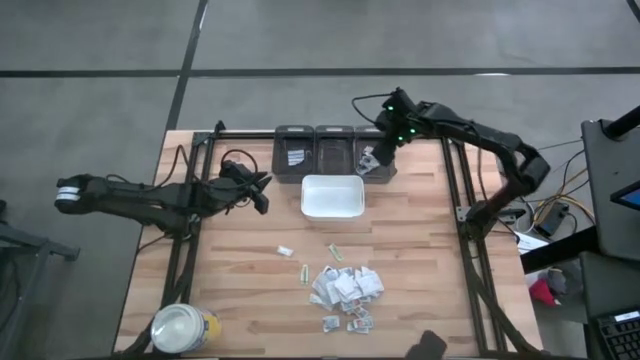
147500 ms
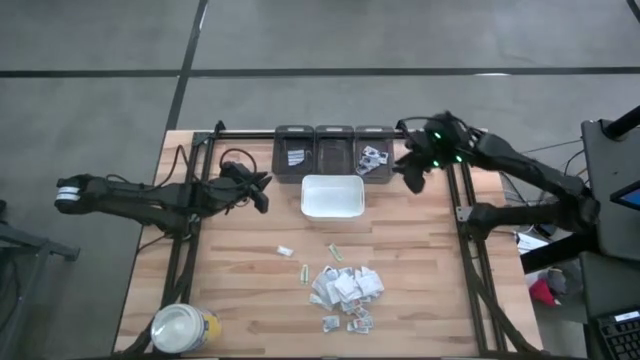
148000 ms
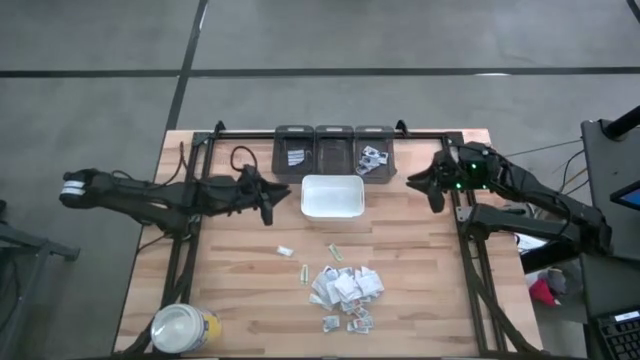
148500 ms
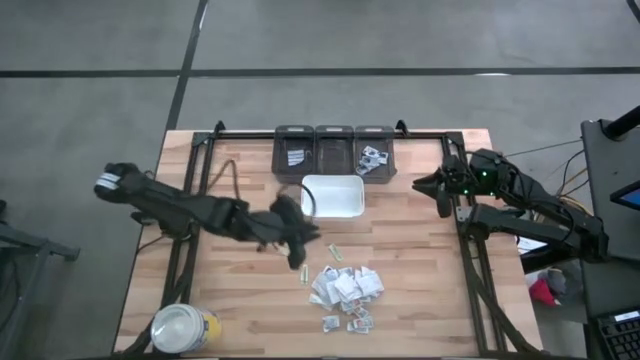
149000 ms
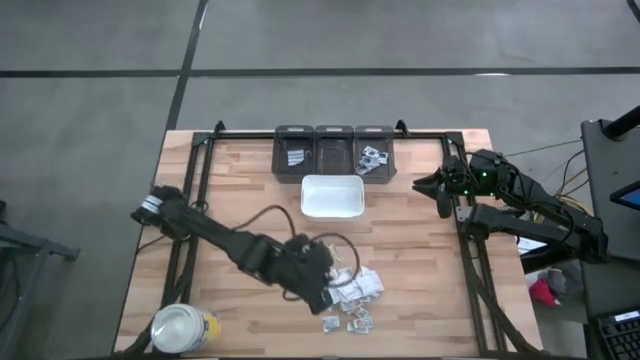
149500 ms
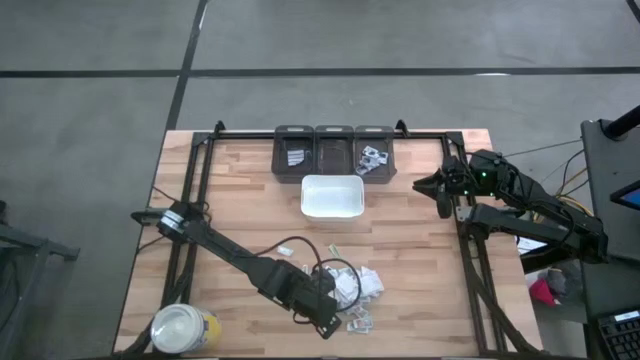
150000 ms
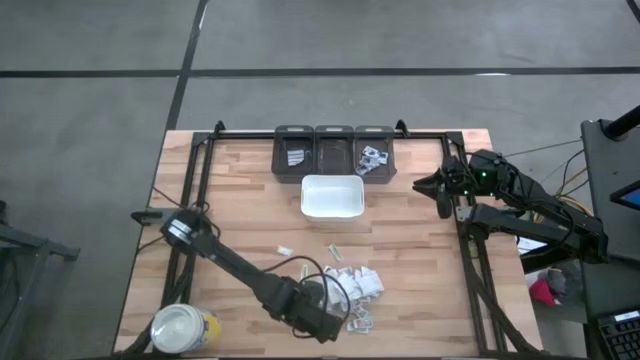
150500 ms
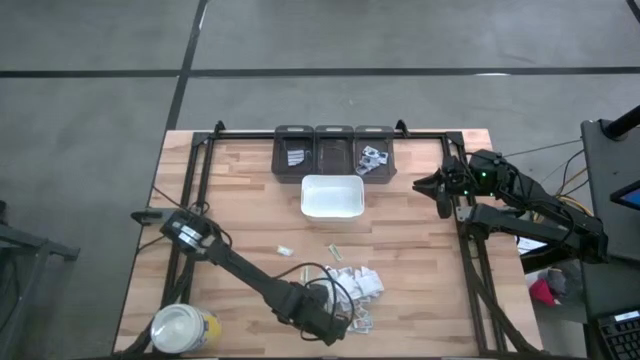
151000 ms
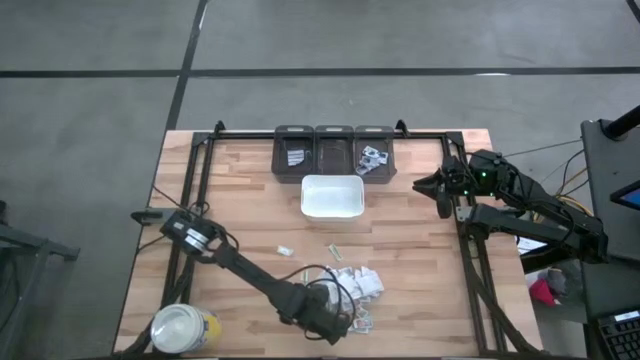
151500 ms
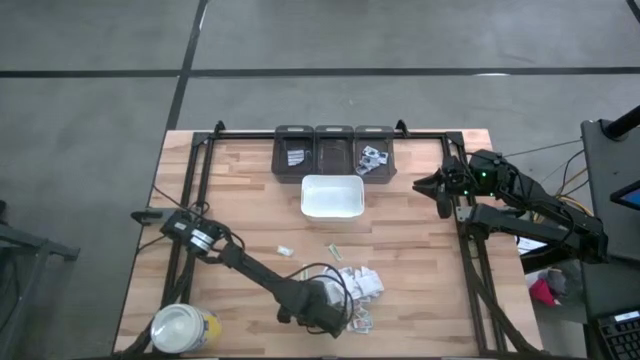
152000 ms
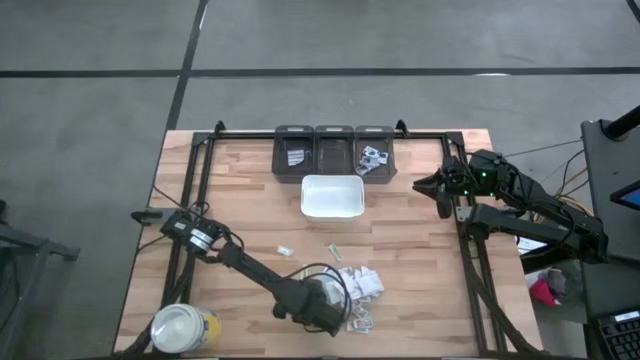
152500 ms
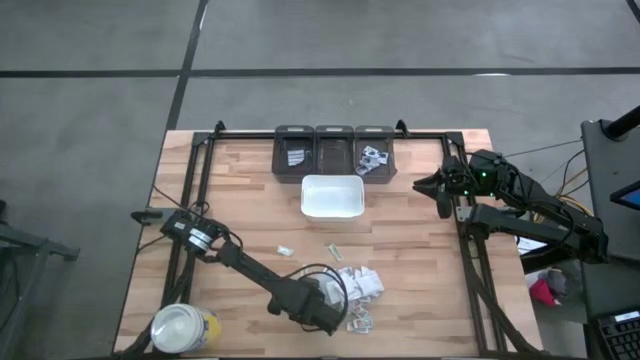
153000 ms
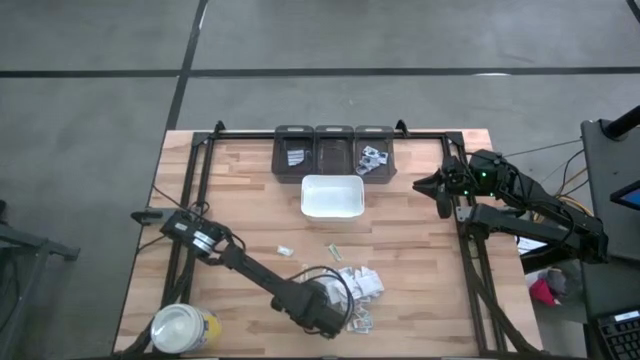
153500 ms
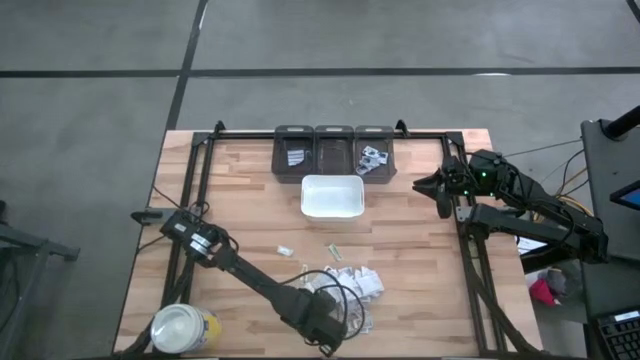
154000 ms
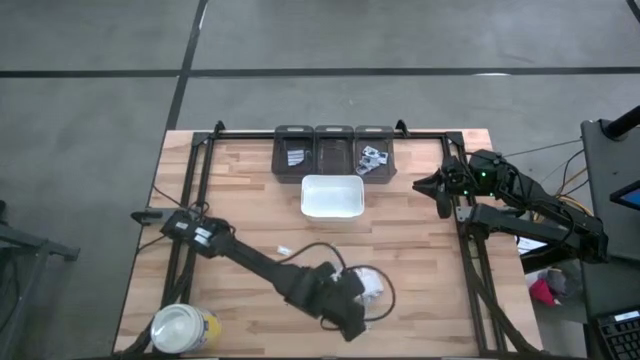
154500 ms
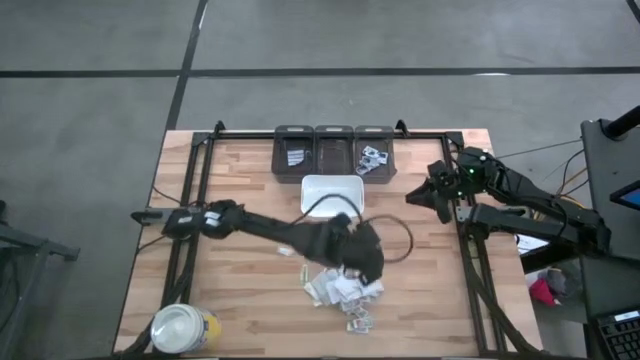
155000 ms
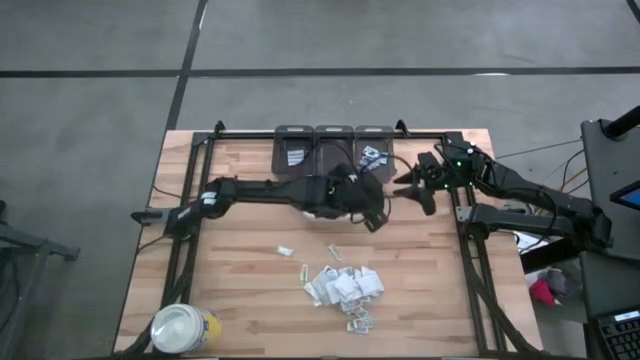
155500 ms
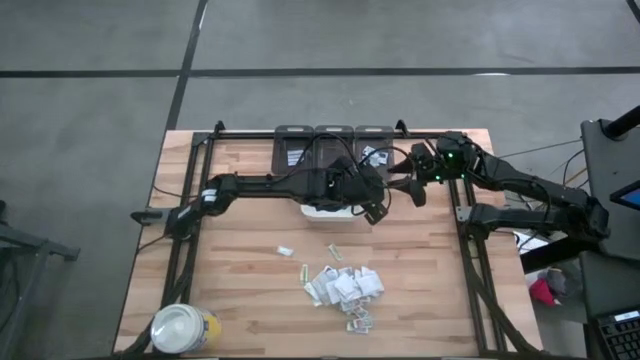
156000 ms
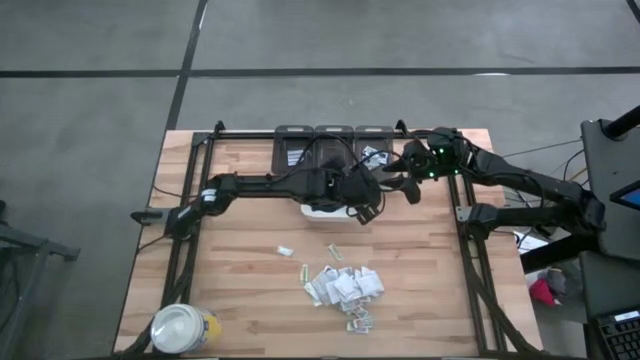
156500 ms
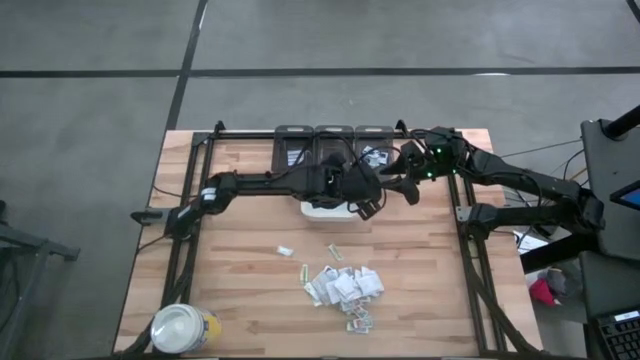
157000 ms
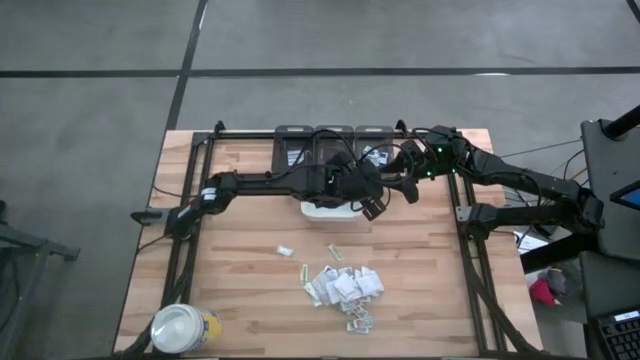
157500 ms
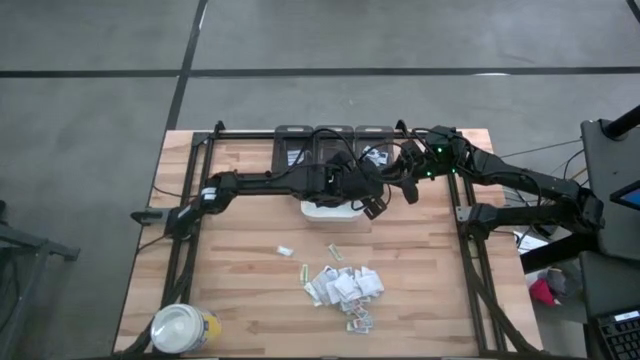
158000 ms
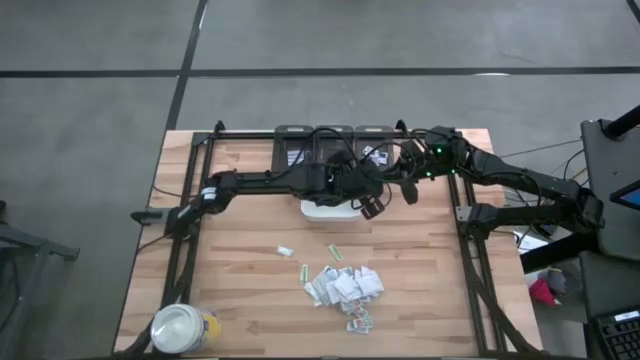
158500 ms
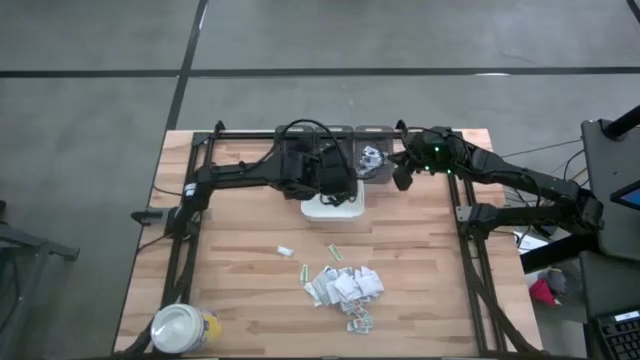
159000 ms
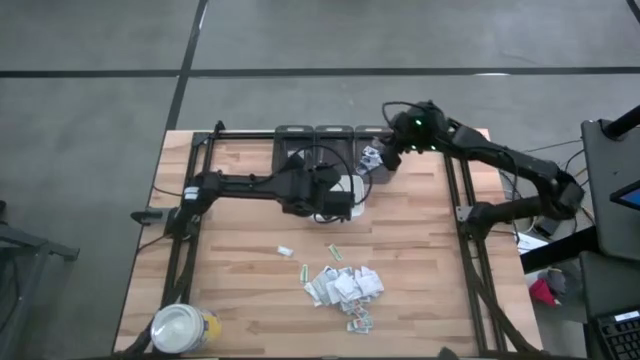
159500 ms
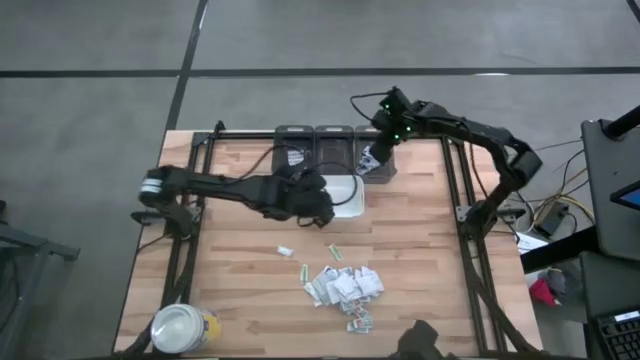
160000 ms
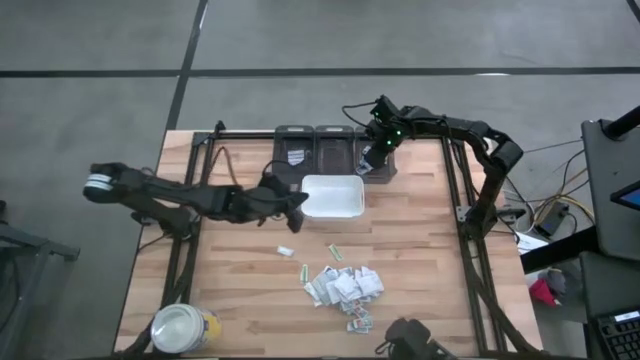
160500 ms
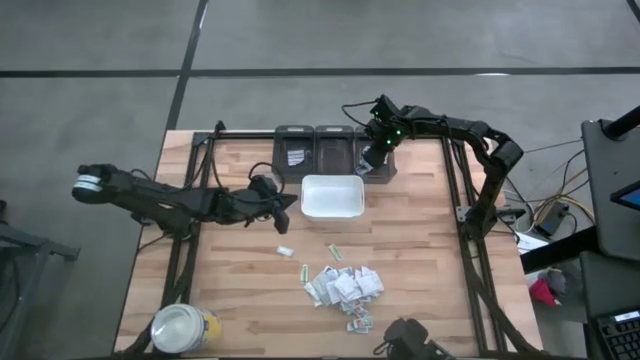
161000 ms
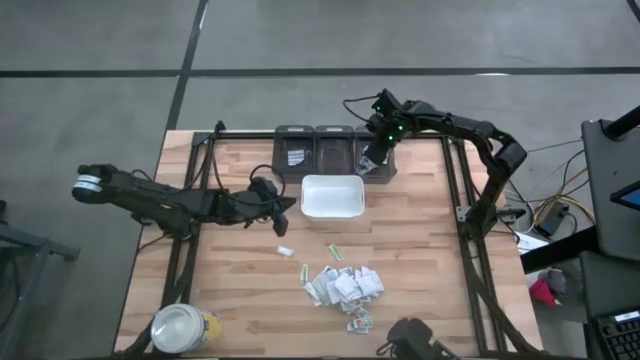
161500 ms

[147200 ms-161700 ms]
Task: Pick & Place First Aid Supplies
Put the white alcohol pad into the right black bin

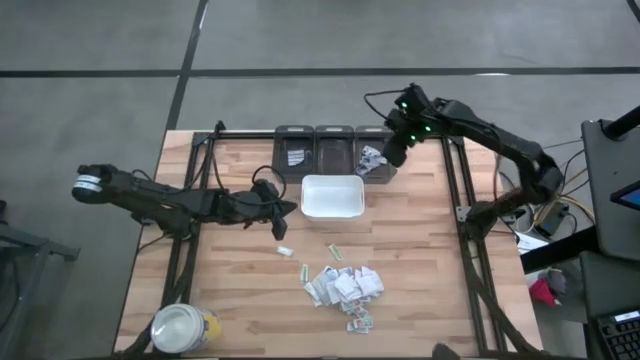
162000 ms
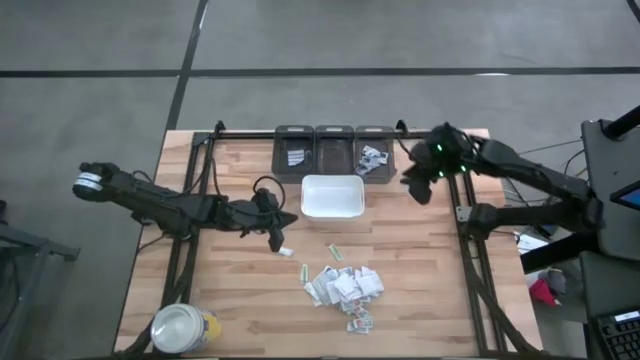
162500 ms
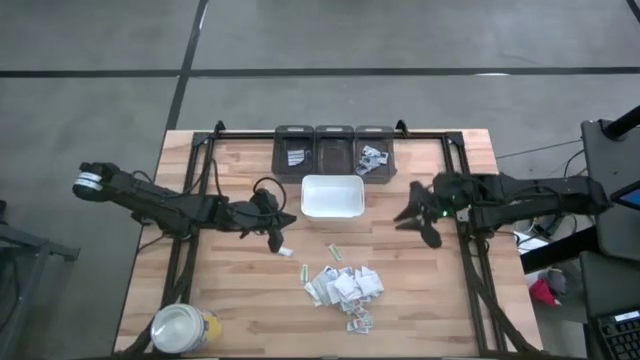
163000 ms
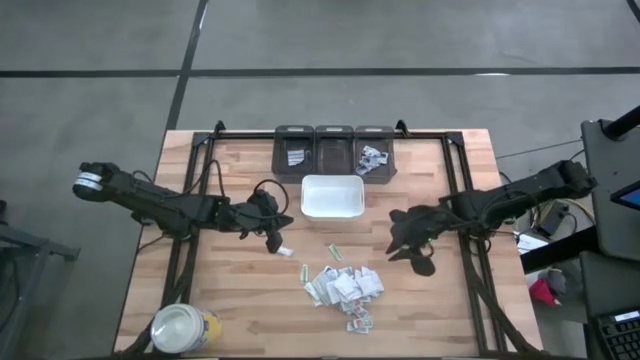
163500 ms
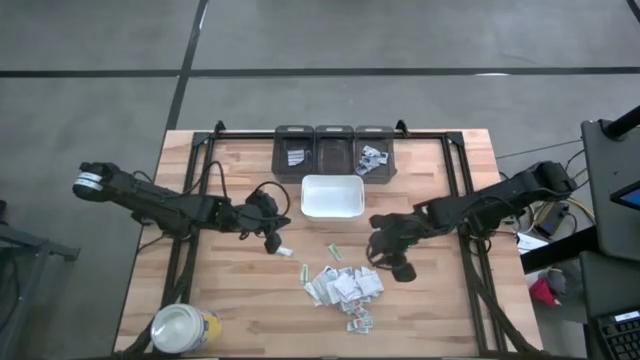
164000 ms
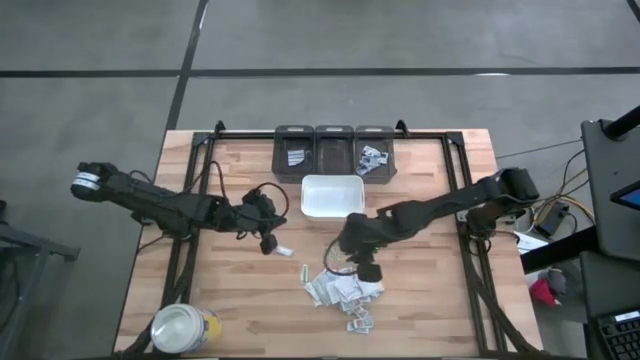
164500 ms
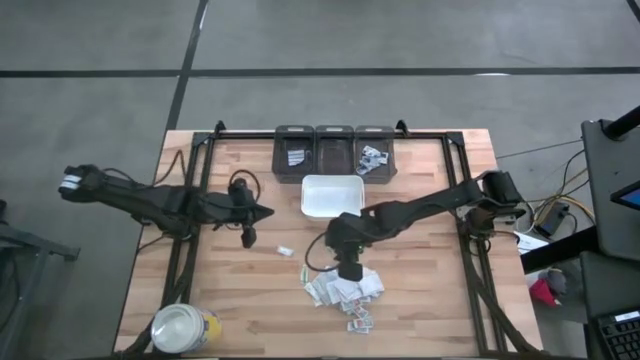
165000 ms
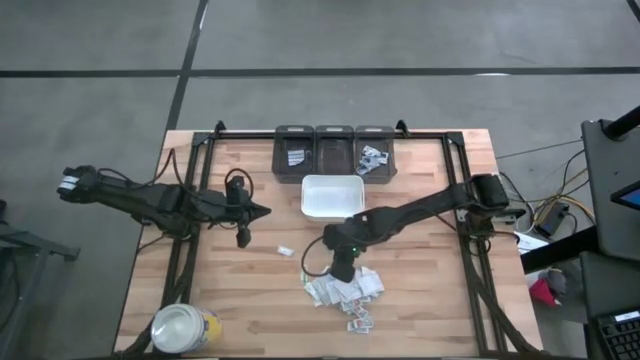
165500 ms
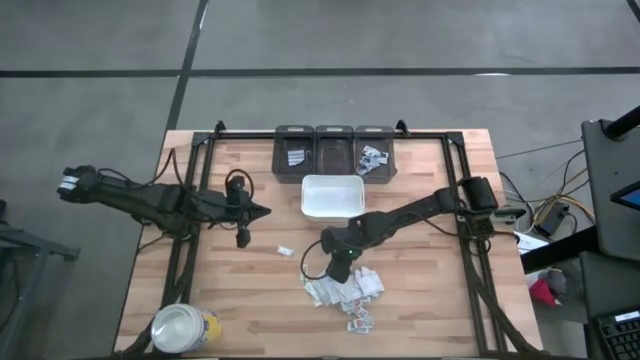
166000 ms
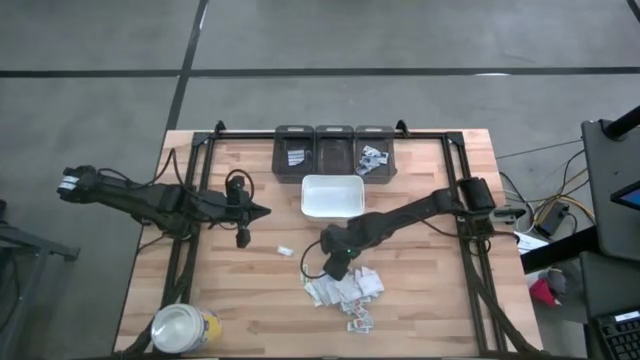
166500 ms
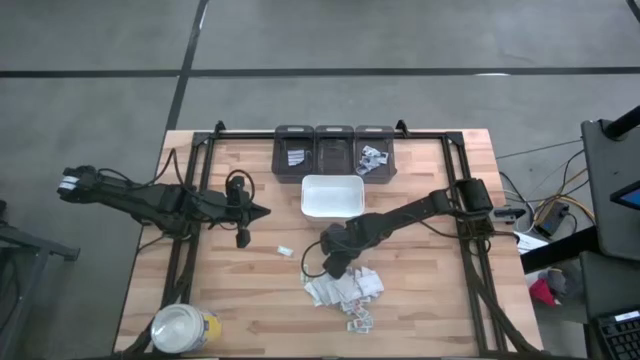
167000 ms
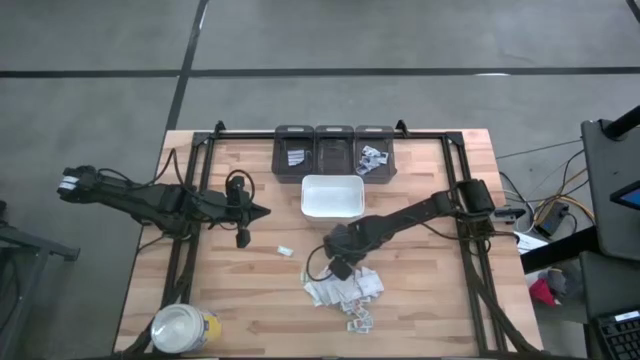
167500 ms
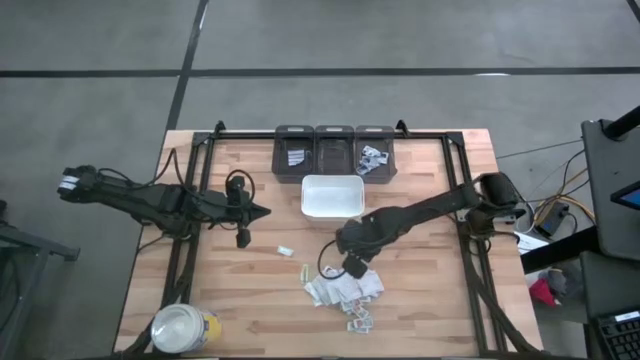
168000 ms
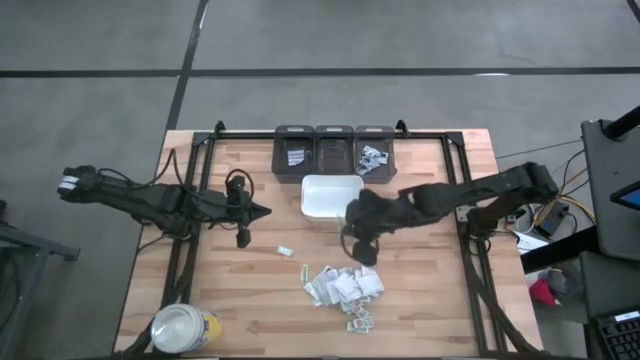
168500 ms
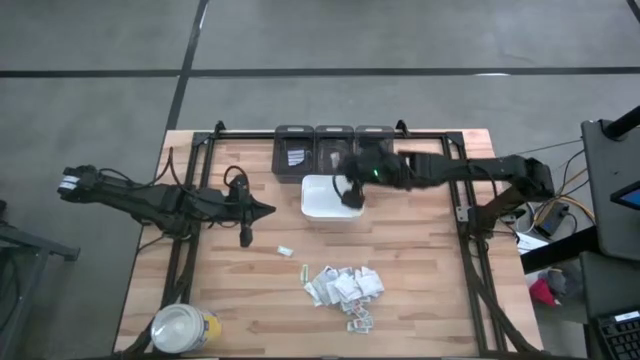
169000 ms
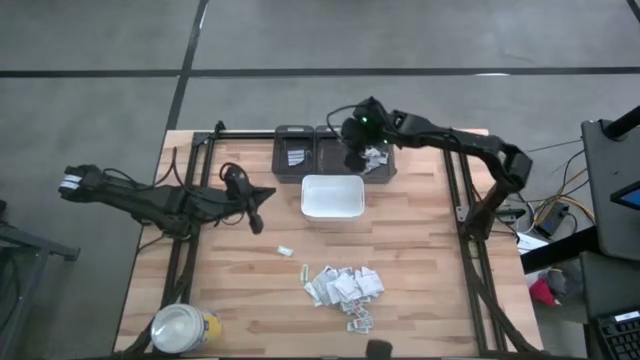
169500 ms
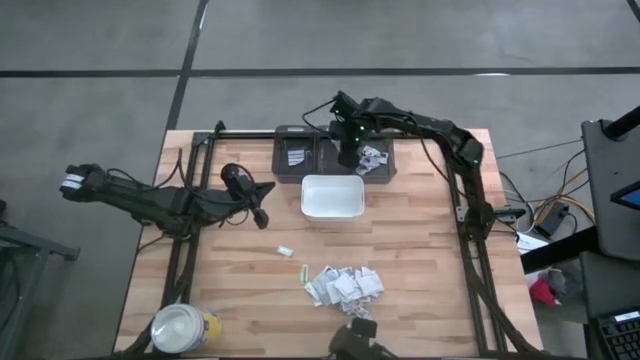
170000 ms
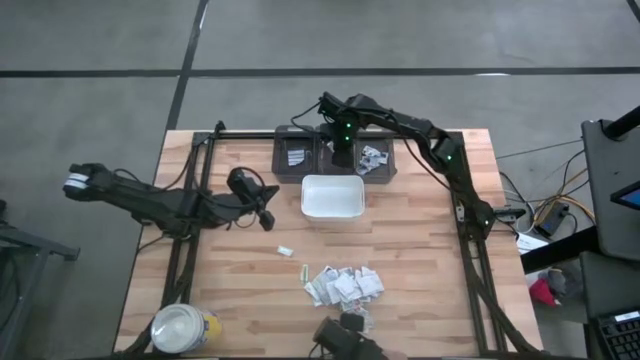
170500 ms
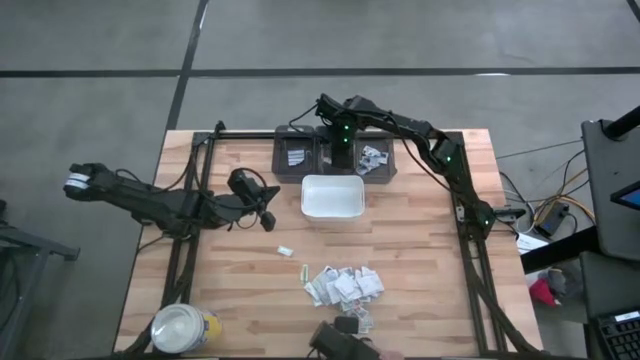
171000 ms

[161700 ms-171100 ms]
Put the green band aid into the middle black bin
